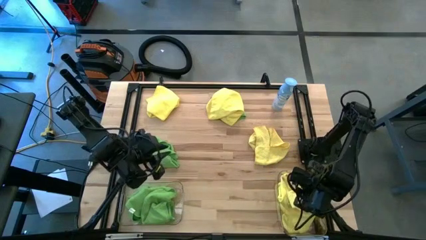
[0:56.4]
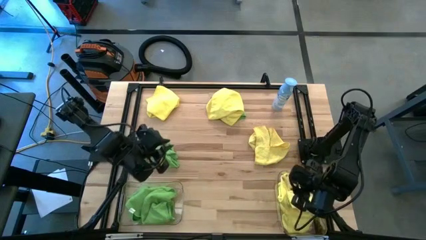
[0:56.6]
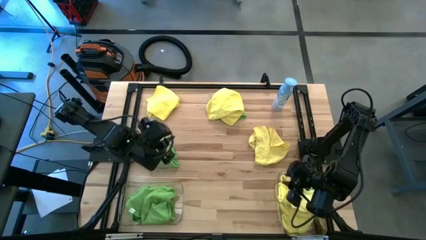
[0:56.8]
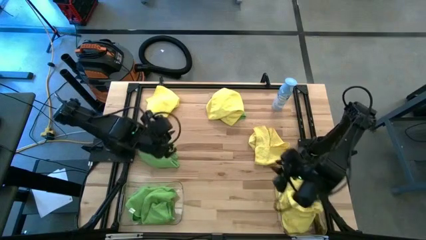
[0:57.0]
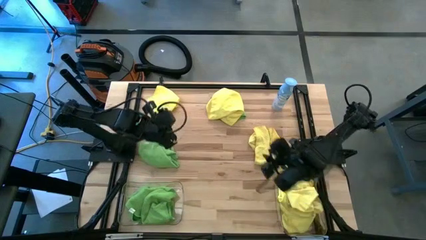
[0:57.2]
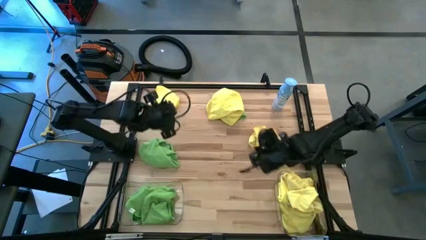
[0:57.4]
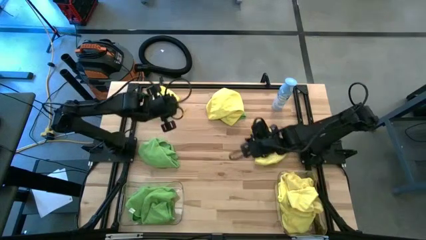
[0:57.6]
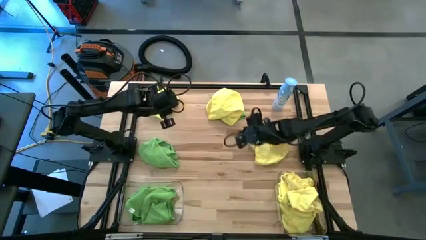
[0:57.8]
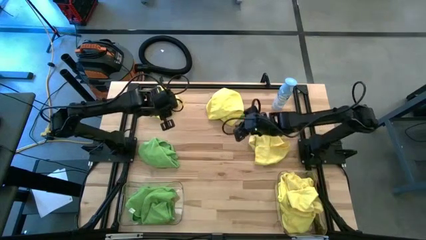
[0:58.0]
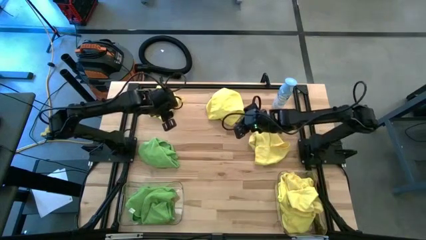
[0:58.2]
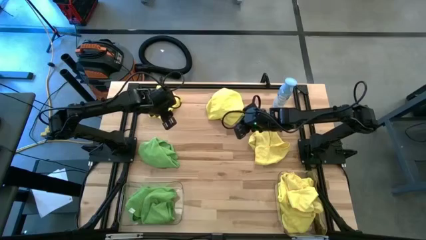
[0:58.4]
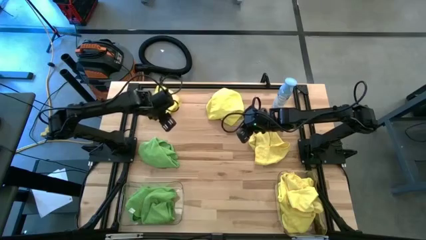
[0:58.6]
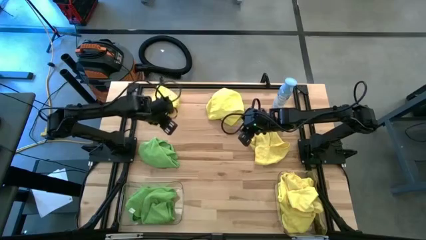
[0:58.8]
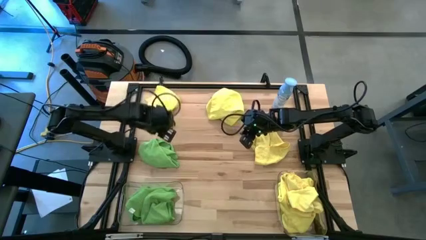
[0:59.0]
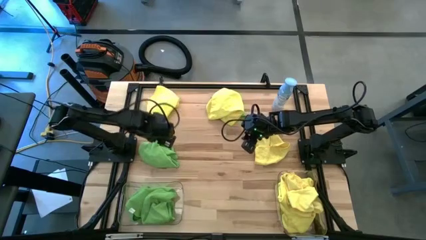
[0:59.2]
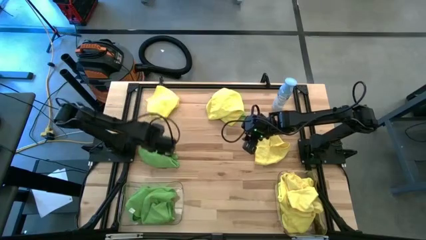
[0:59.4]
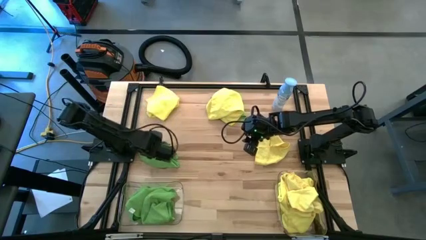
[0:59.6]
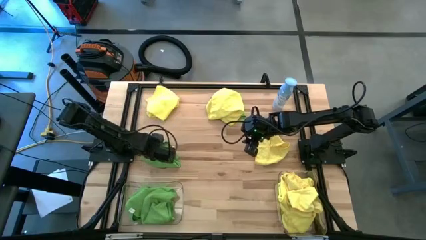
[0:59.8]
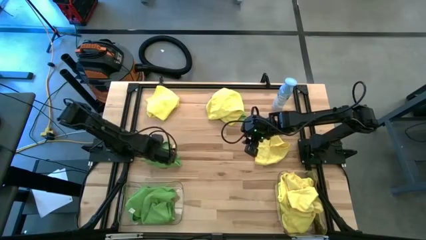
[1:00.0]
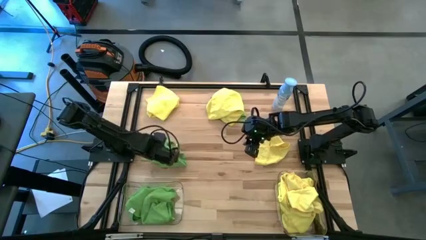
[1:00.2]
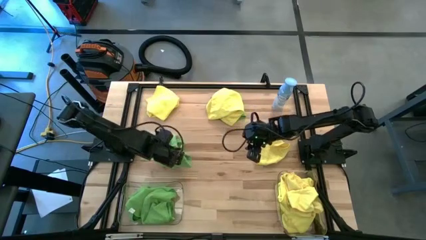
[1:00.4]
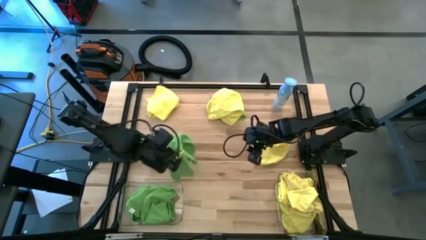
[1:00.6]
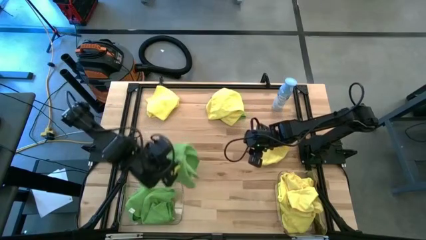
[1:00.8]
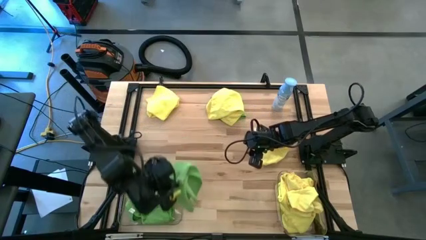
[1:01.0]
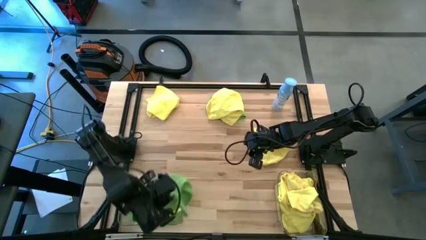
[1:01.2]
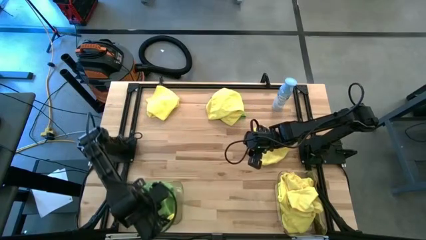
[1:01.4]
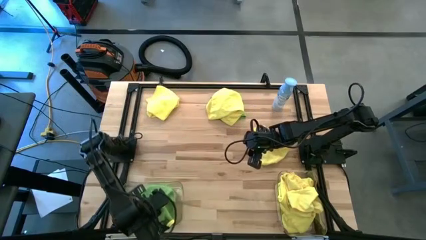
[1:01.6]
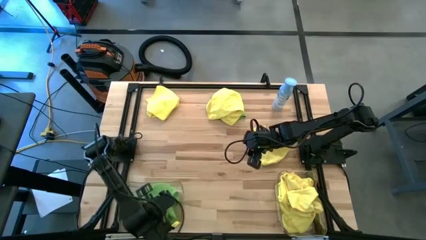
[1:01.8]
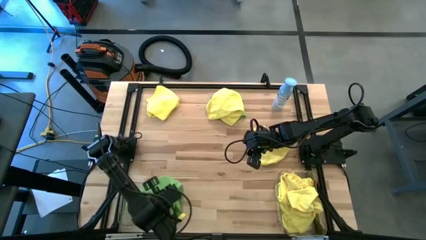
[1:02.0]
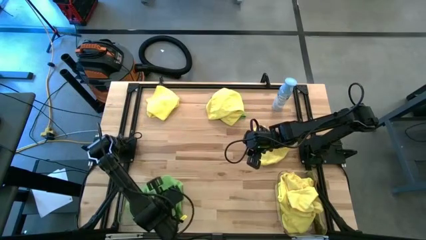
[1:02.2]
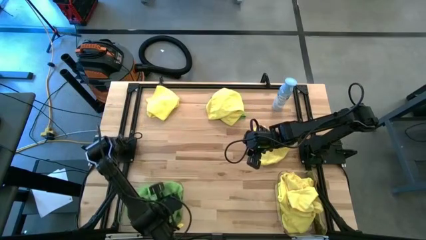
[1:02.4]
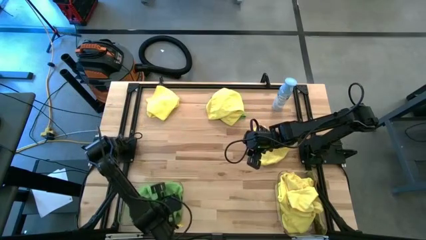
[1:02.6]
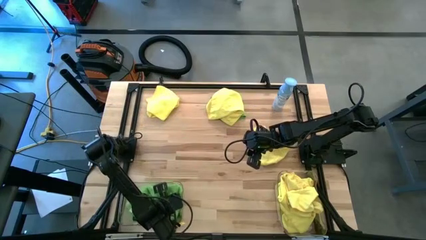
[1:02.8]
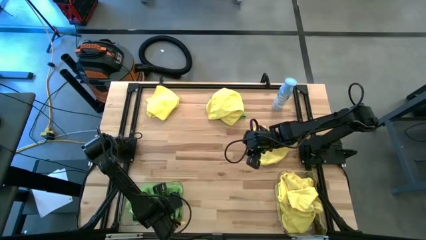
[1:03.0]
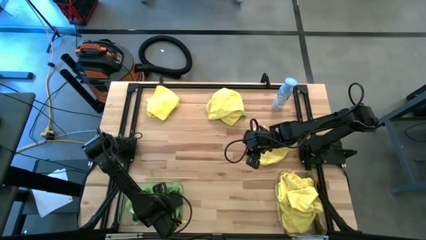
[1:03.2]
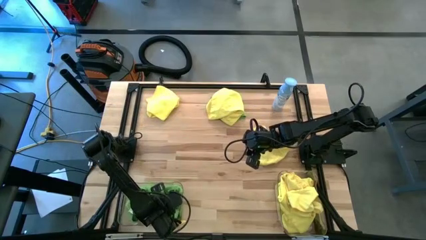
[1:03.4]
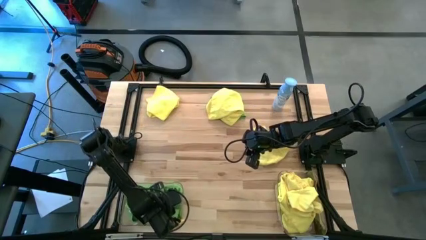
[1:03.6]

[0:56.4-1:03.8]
Task: Sort microfiber towel by color & place in baskets
Put the bottom green microfiber towel into the left transparent bin

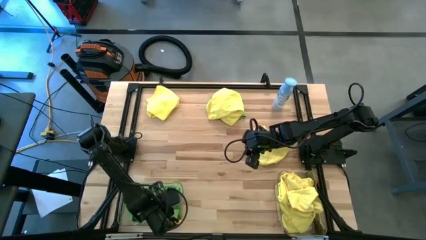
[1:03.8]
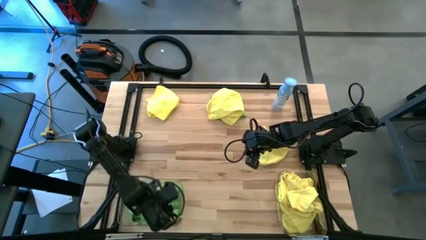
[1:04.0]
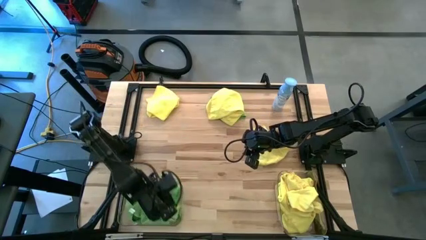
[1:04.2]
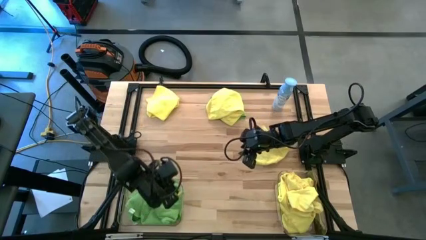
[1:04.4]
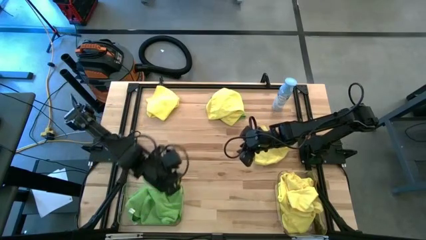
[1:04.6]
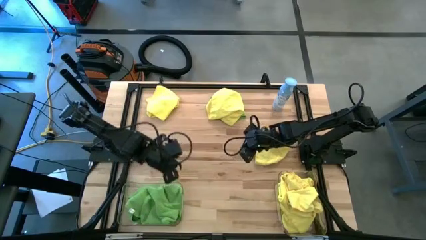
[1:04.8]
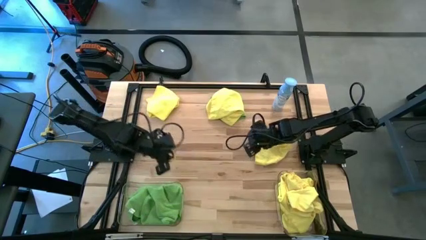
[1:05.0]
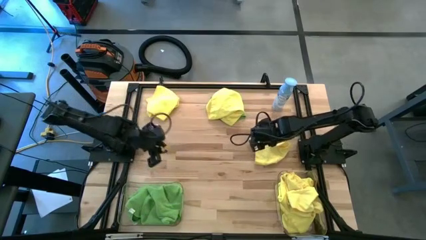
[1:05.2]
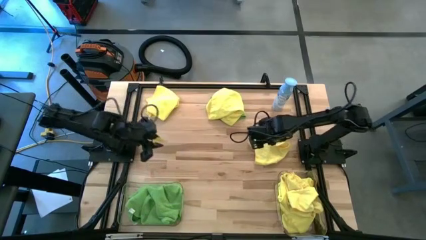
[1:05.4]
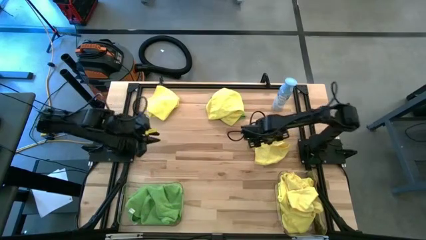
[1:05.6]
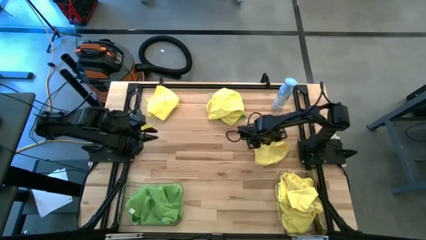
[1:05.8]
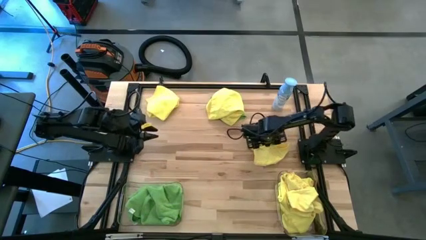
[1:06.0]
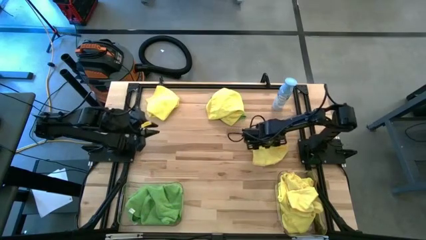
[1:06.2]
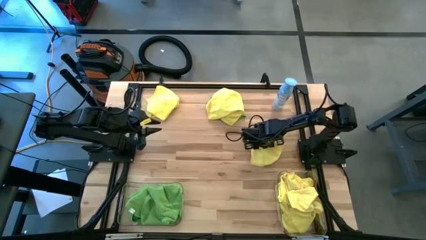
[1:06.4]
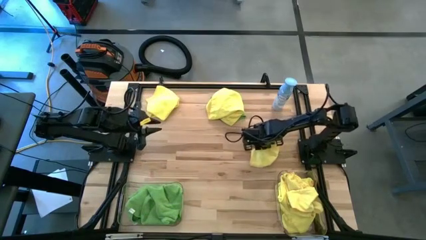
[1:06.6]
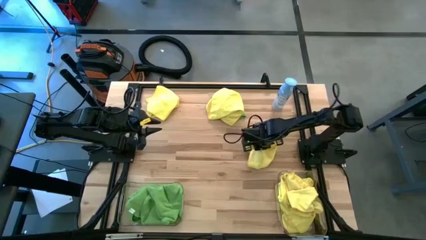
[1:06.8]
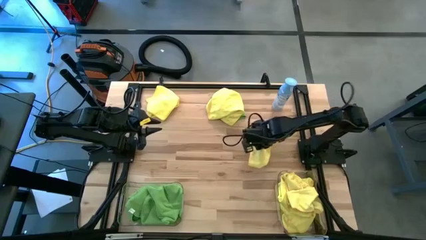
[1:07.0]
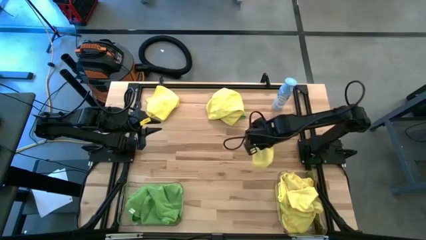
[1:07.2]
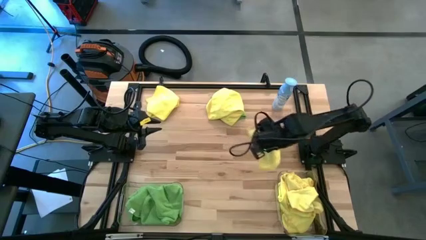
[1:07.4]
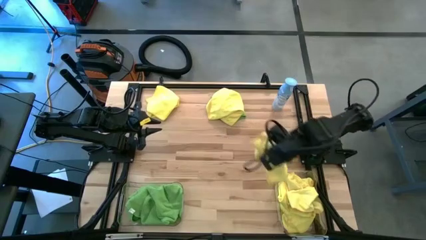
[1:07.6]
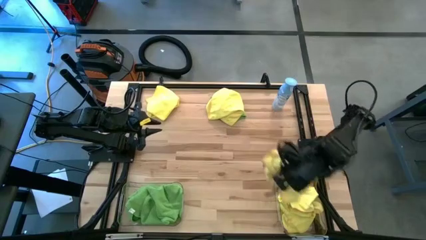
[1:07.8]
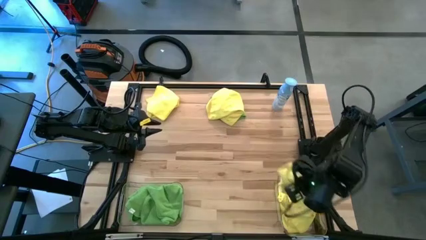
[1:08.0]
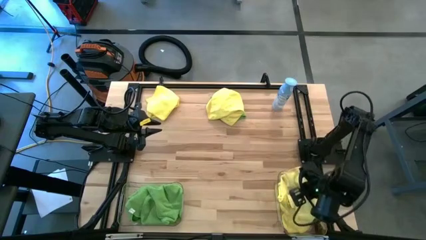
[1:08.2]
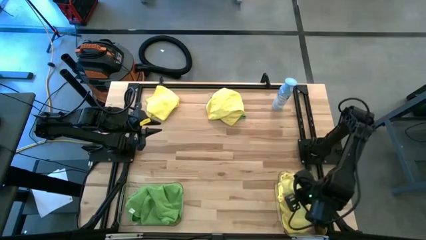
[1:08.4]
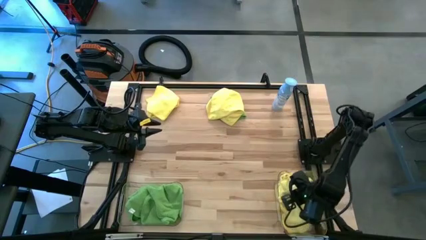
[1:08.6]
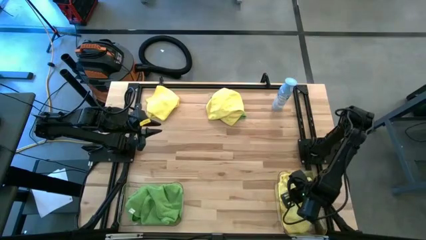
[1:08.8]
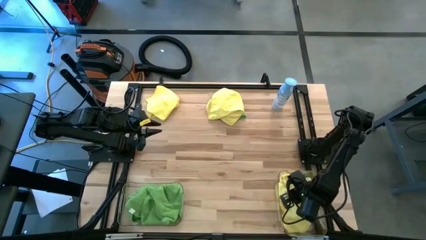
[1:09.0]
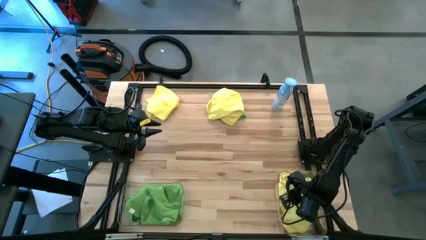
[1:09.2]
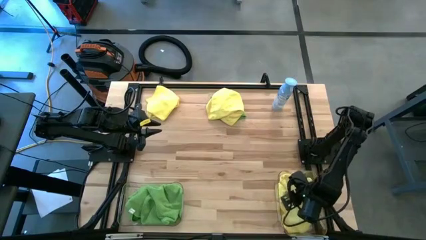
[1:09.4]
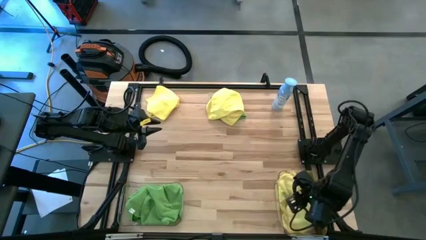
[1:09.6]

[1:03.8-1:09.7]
Put the middle right yellow microfiber towel into the right transparent bin

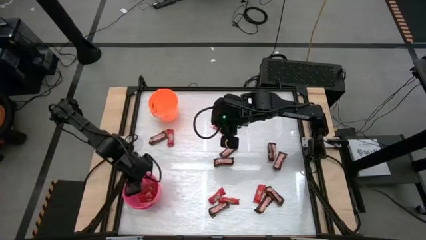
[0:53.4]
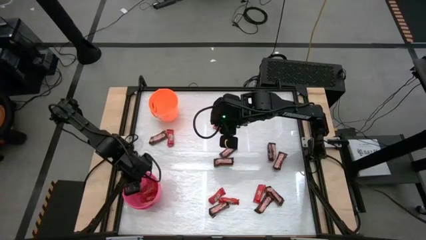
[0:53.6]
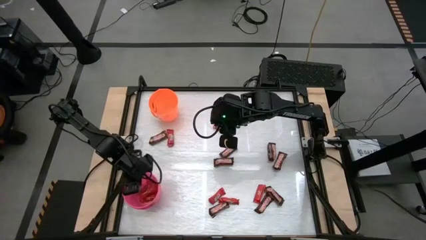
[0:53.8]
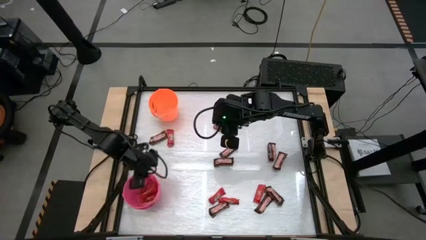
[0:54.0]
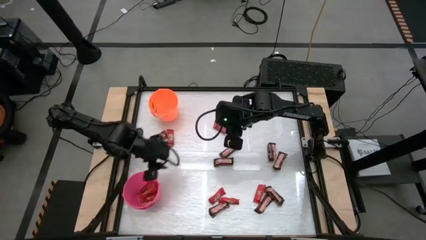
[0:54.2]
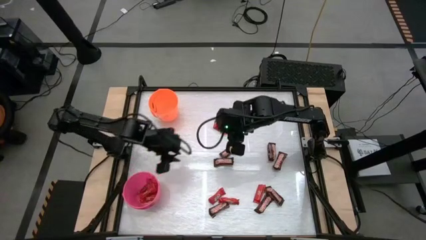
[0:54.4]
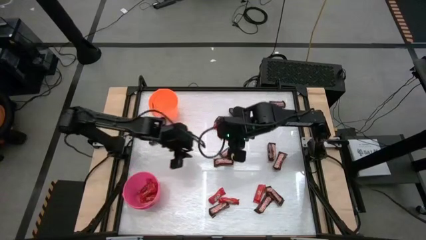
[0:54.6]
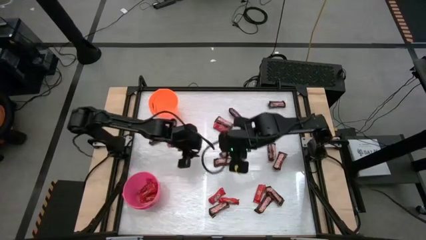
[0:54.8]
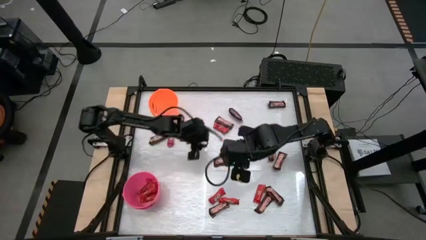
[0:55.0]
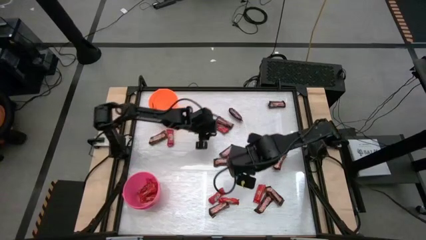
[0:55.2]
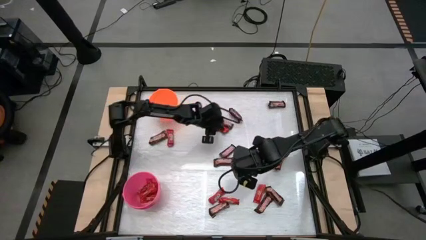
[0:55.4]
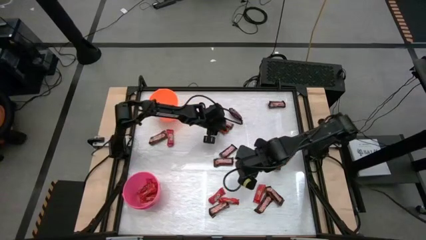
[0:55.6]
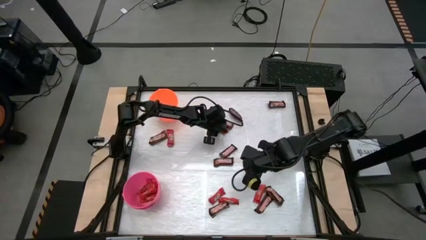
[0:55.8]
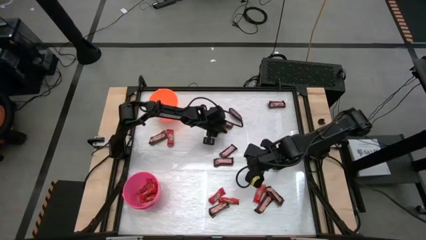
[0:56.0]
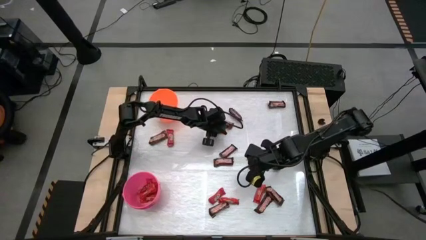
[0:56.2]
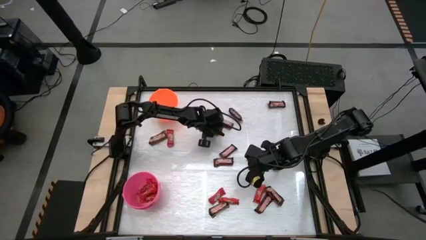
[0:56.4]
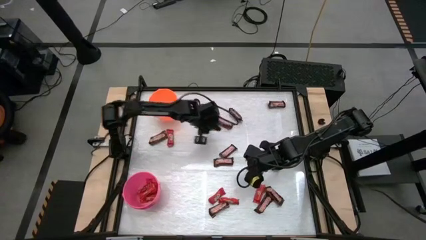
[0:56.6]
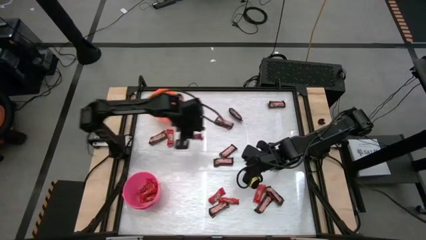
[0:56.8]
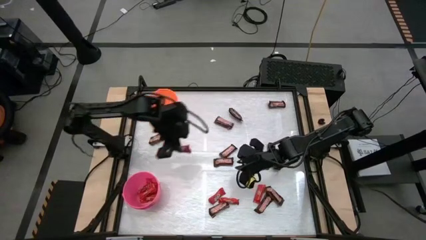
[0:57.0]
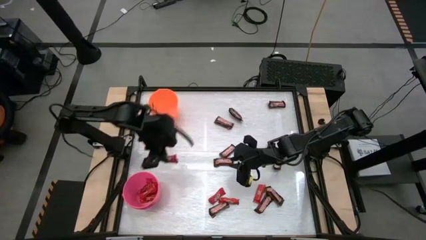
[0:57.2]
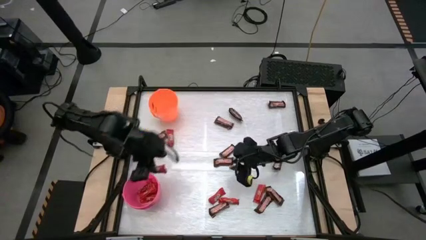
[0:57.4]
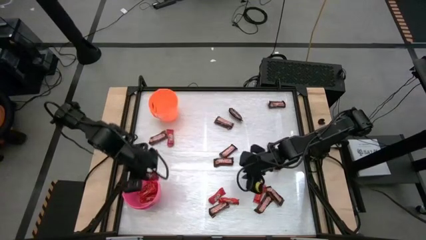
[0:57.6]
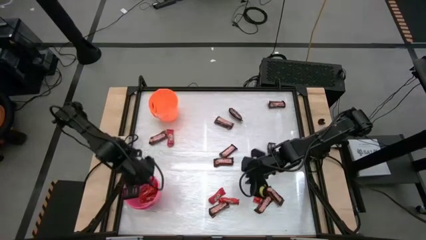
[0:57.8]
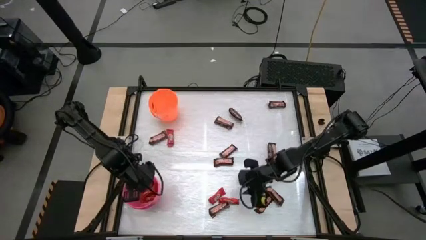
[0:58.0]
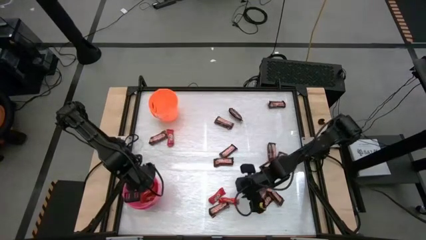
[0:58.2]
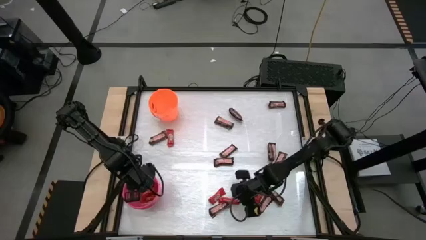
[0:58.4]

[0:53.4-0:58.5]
Task: Sort candy by brand, put in halloween buckets
Put the red chocolate bar into the pink bucket
